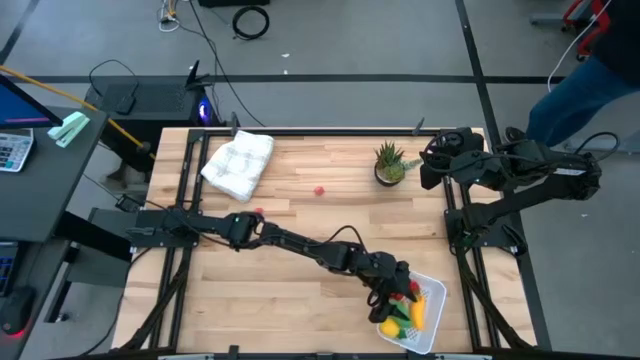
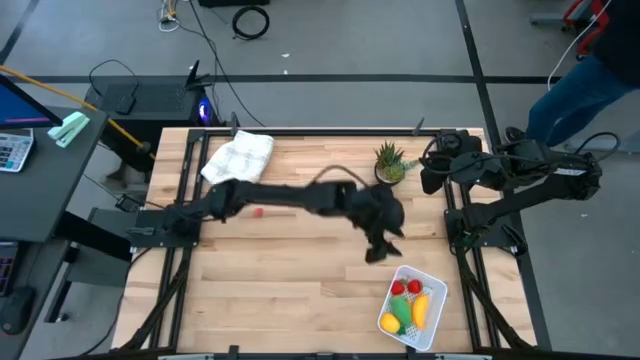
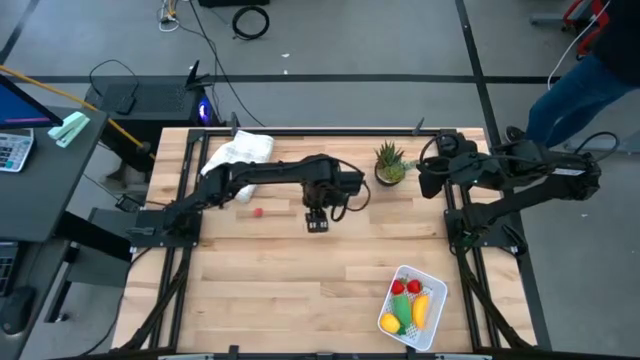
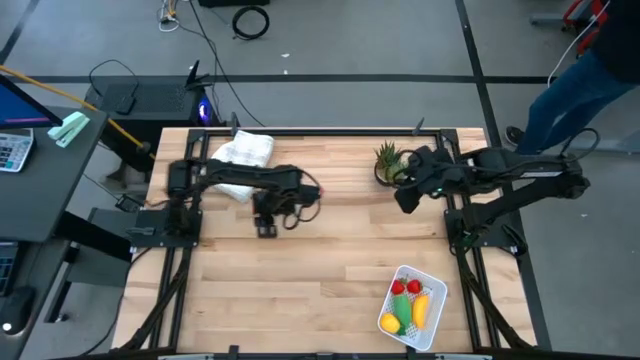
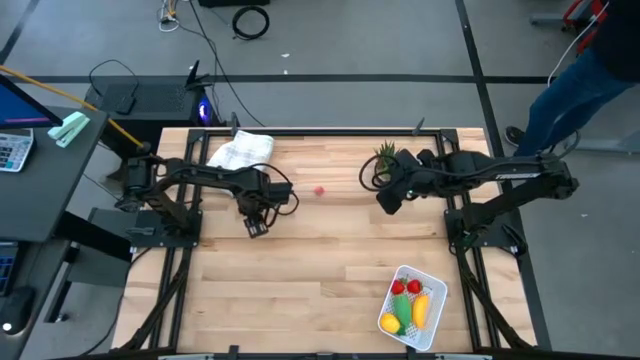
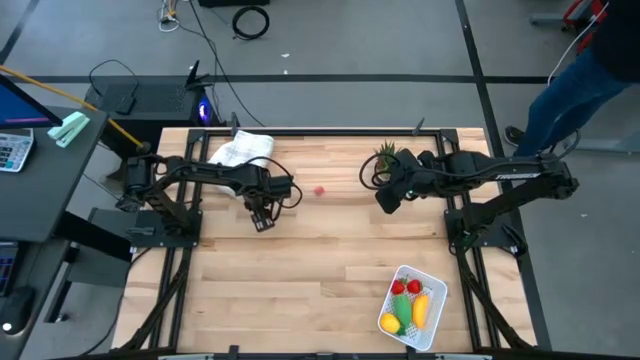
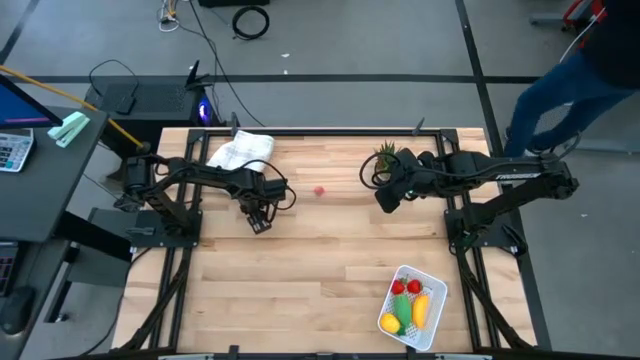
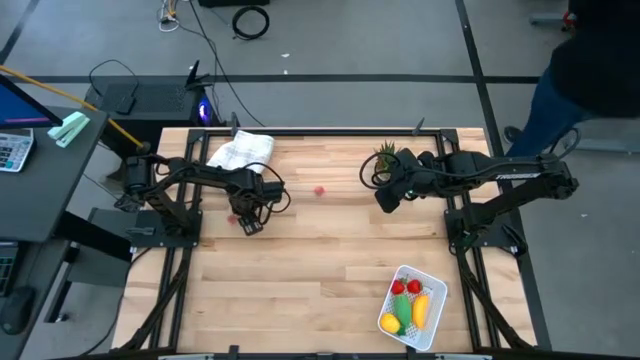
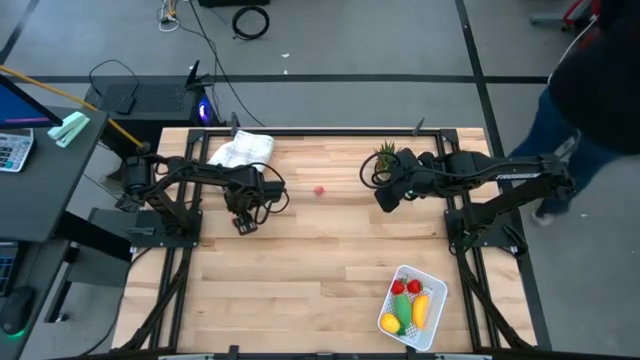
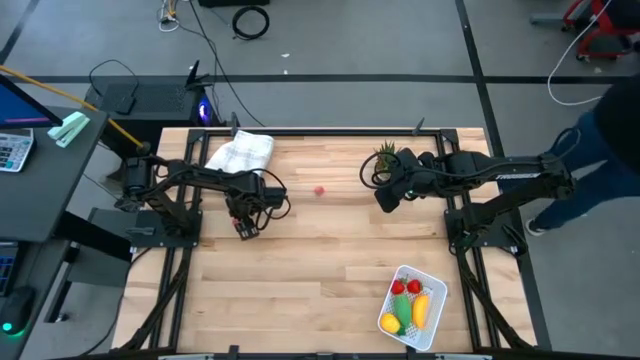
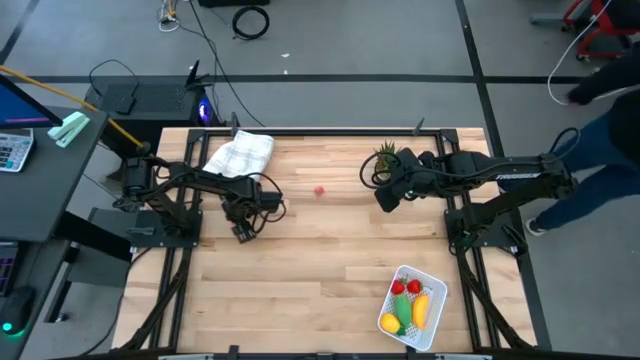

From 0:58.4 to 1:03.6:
Task: Pick and placing Produce into tupperware
Put the left peach into the white bin

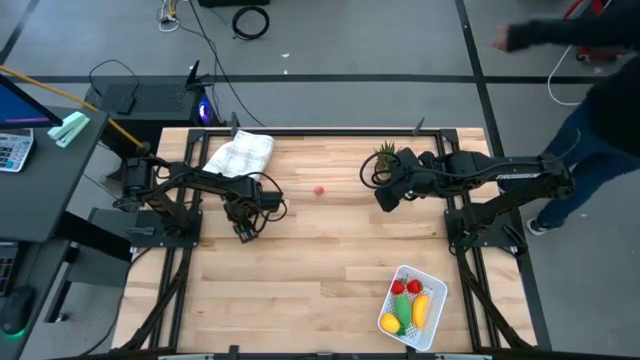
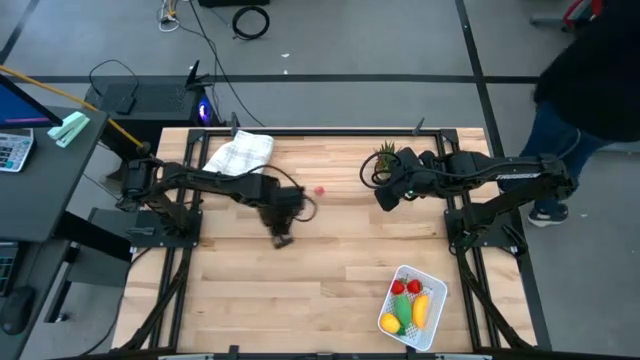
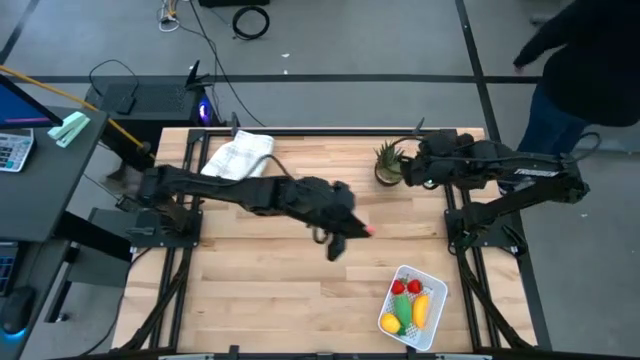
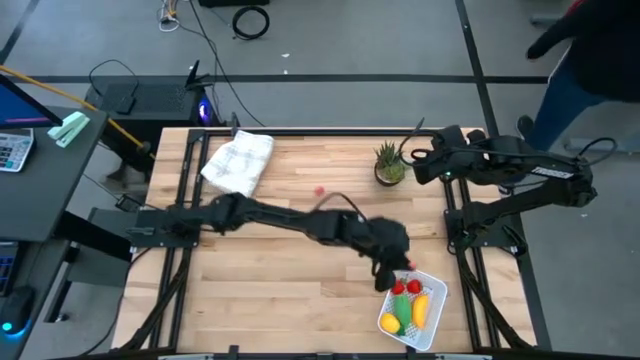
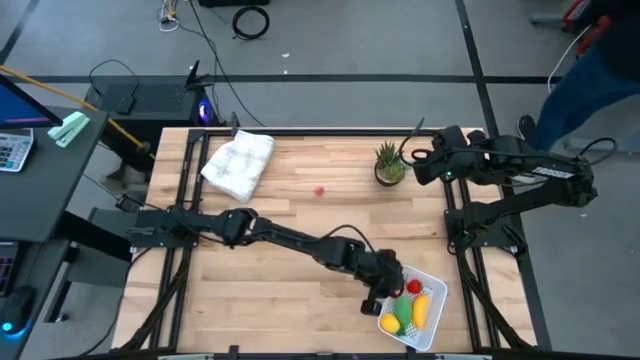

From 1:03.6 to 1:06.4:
Put the left peach into the white bin

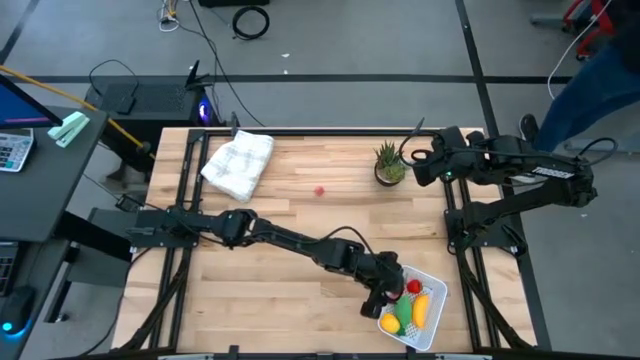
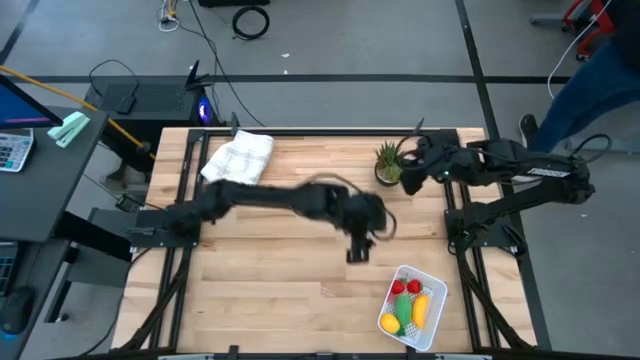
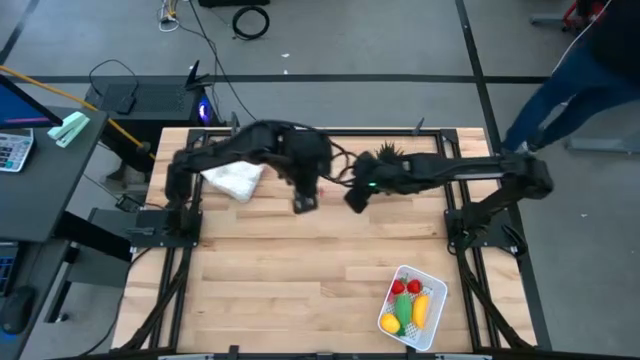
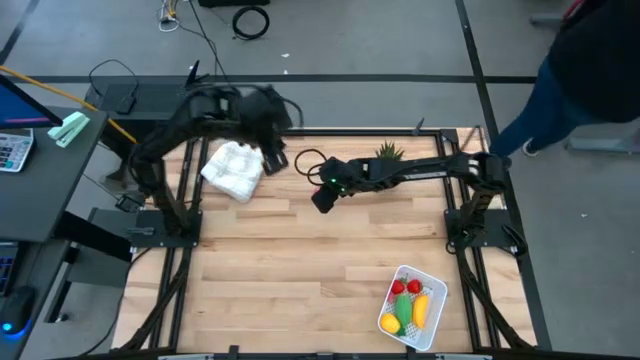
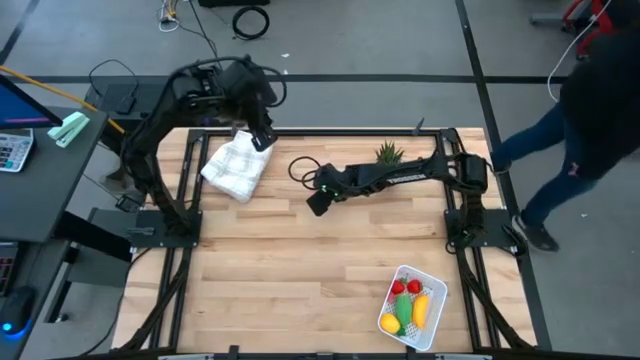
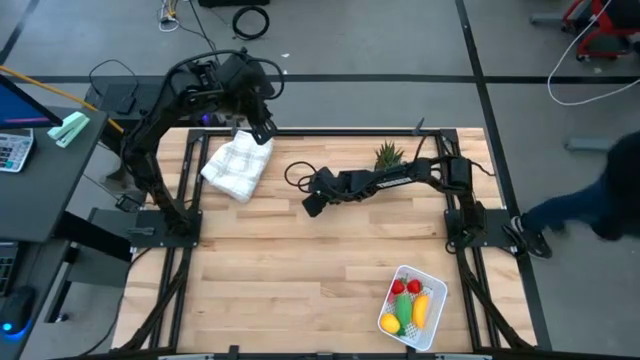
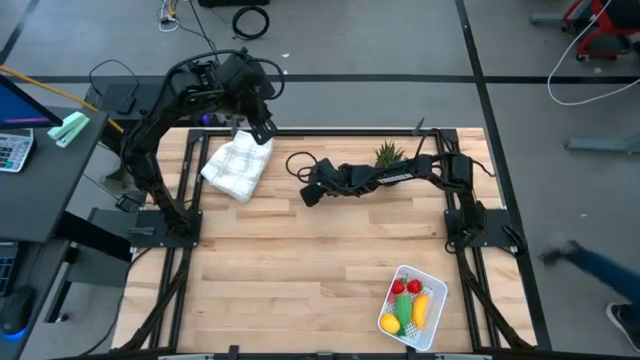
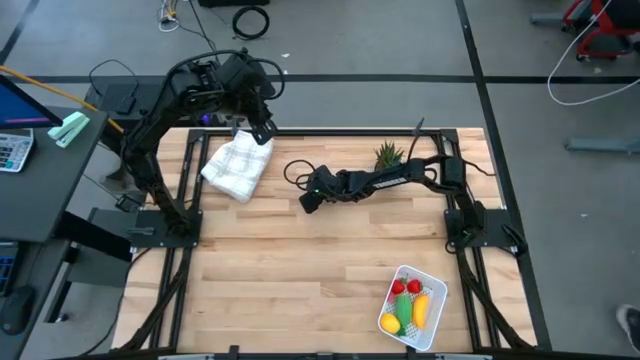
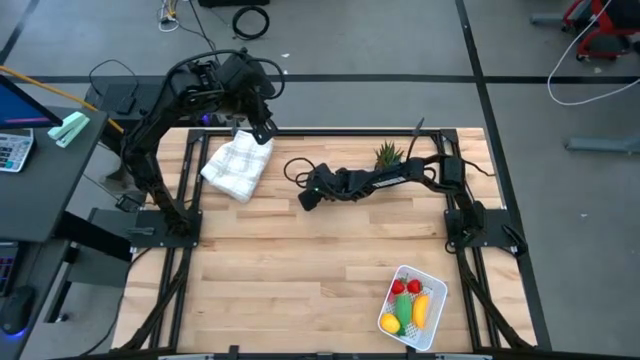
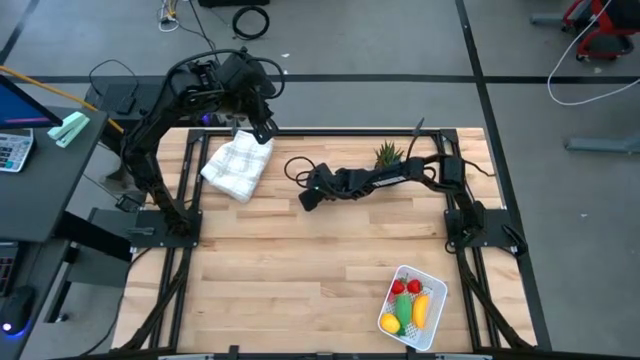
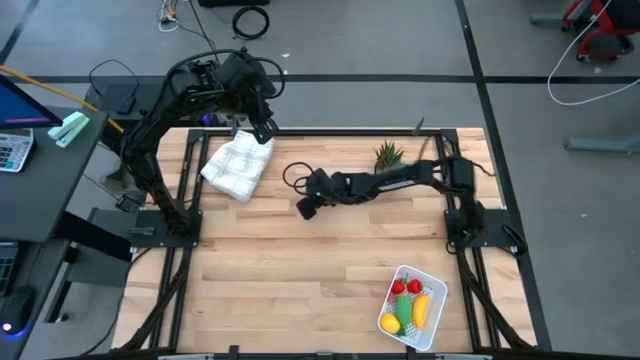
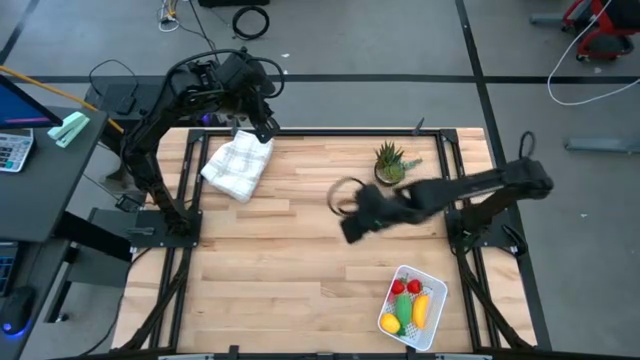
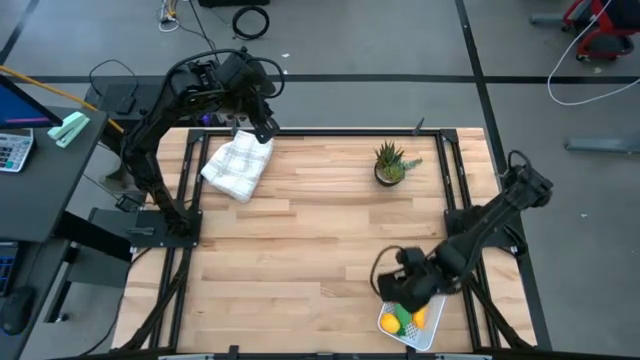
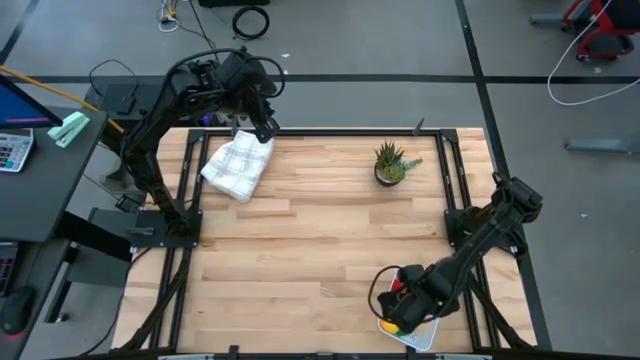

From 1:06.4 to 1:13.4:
Put the peach into the white bin

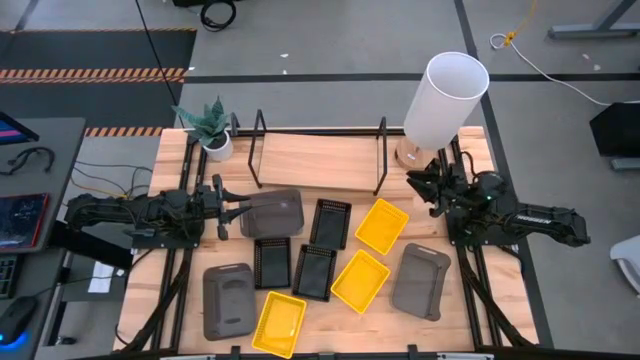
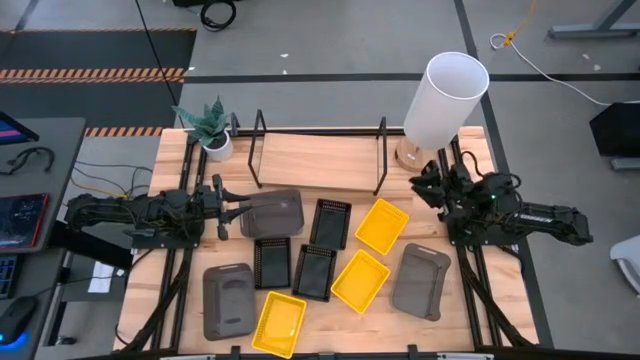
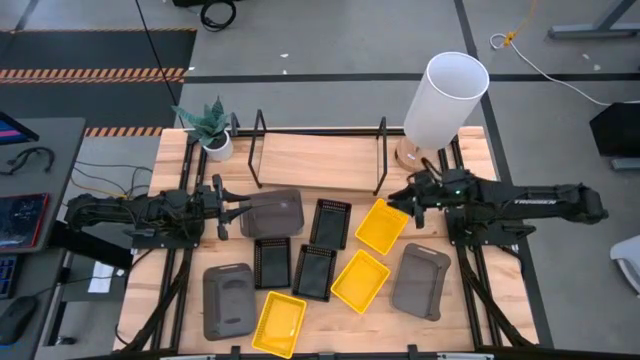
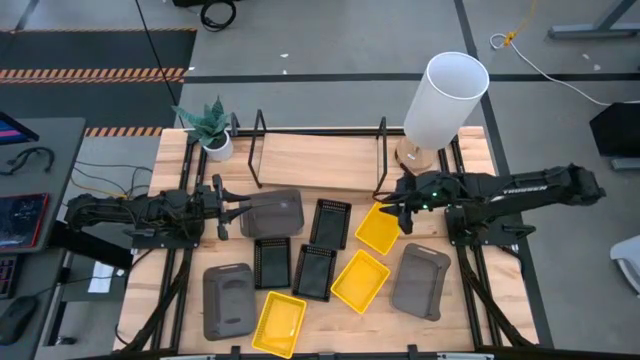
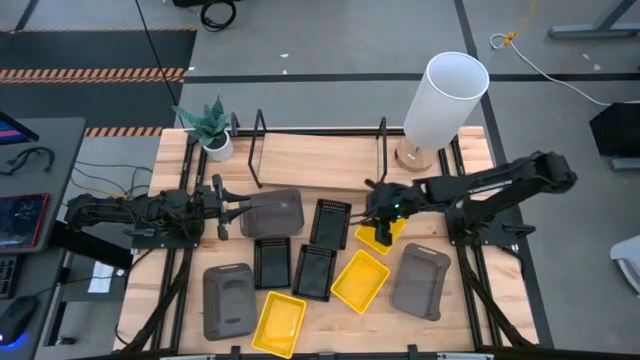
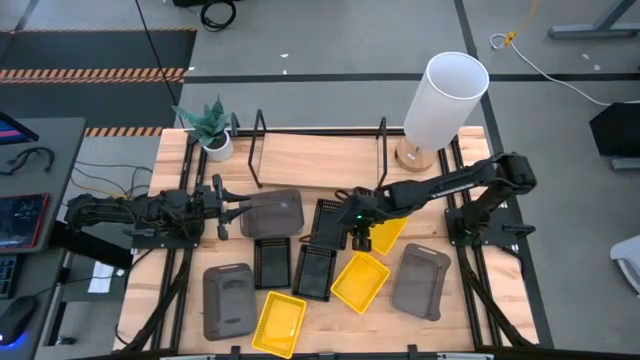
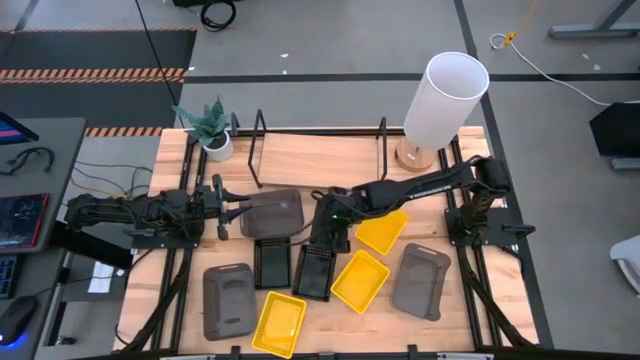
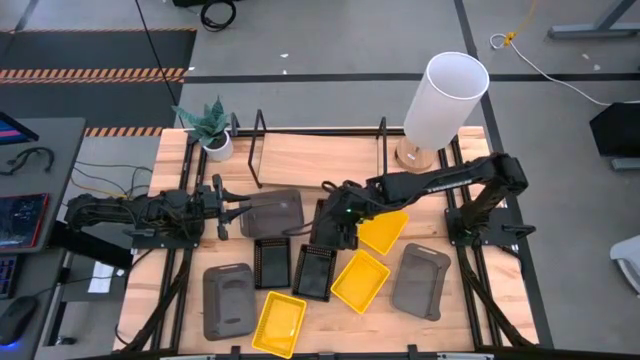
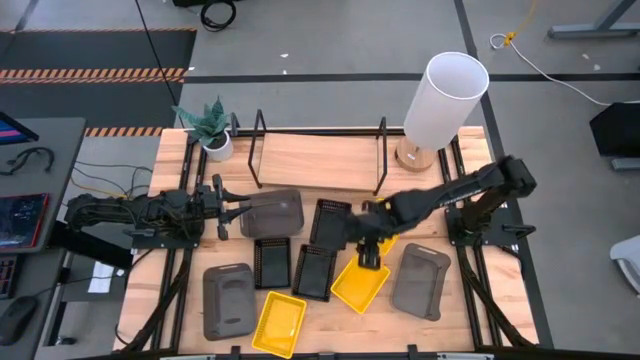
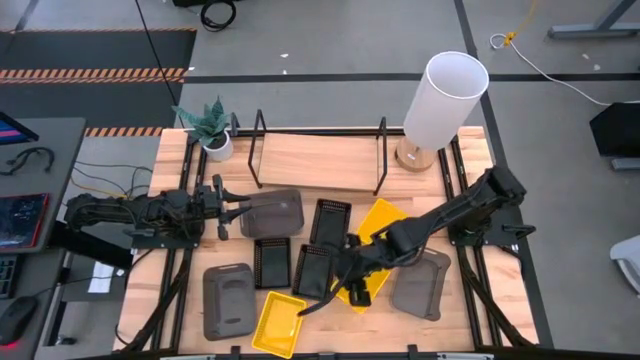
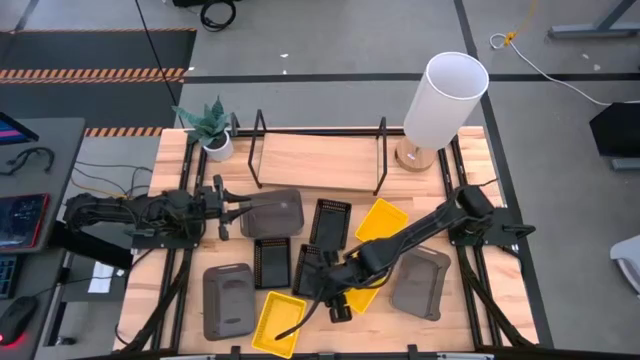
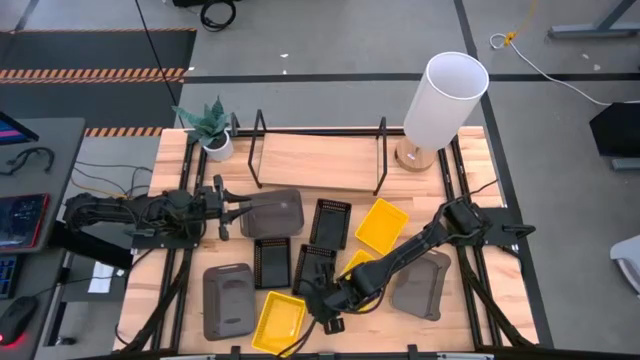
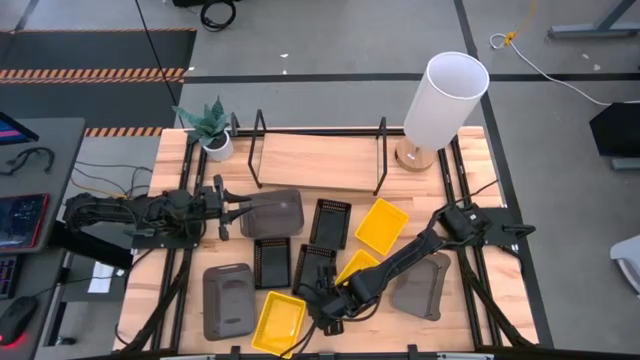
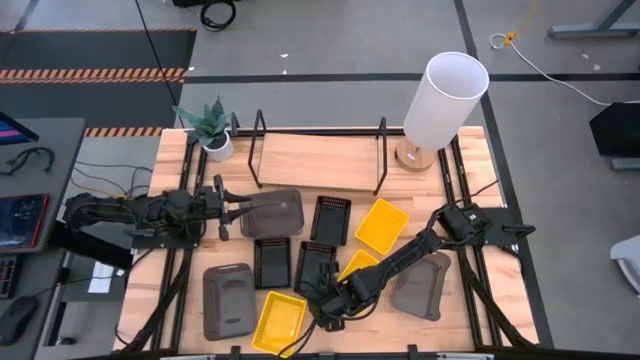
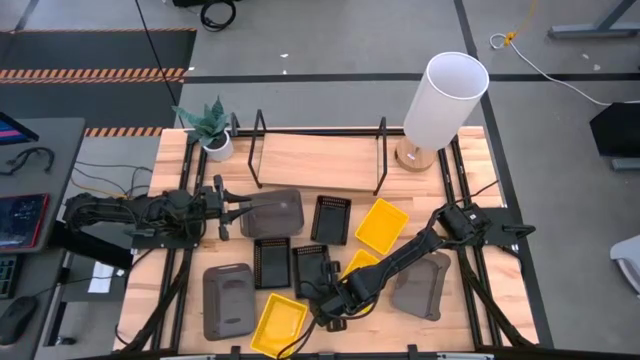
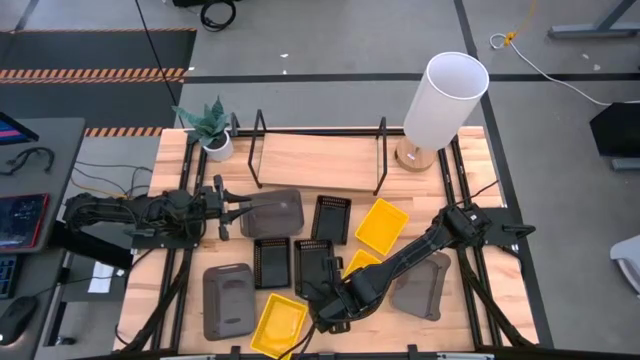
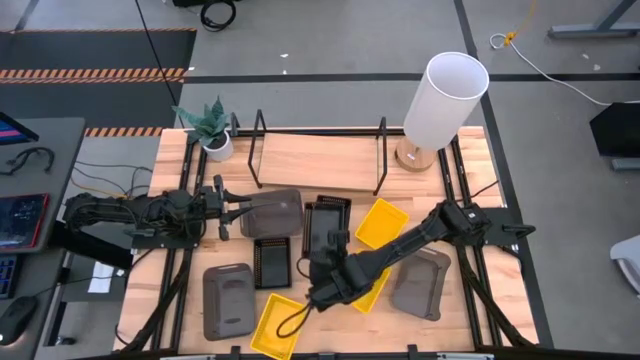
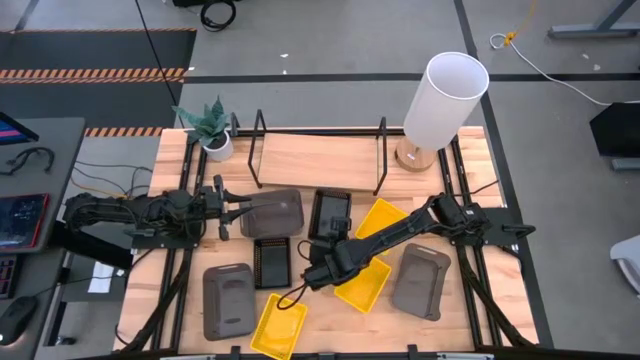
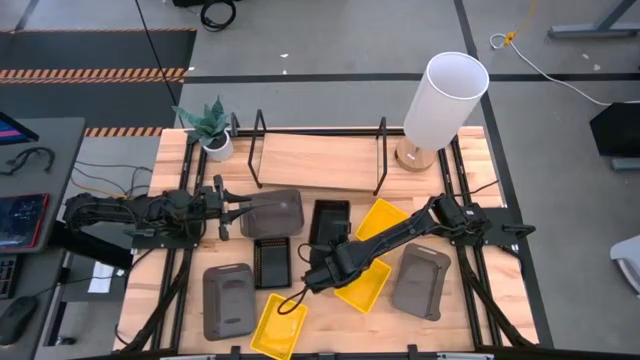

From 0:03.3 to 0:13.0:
Task: Stack baskets on shelf by color
Stack the bottom right black bin on top of the top black bin
